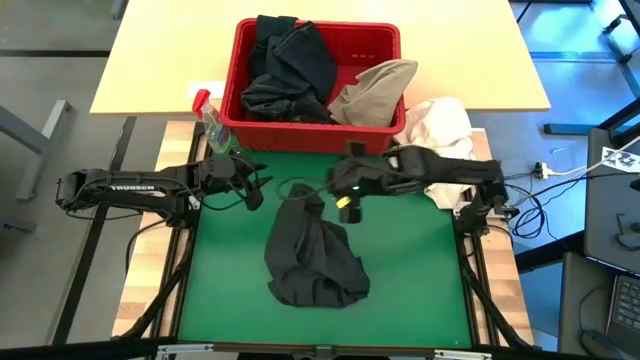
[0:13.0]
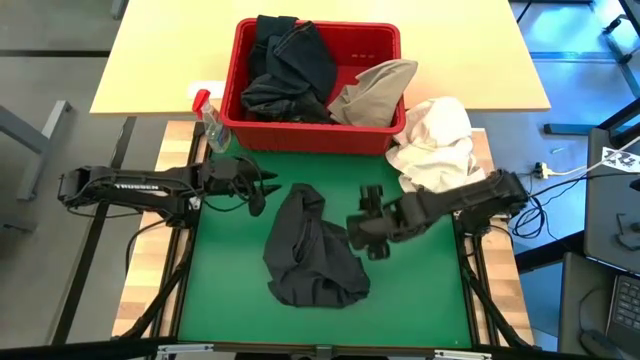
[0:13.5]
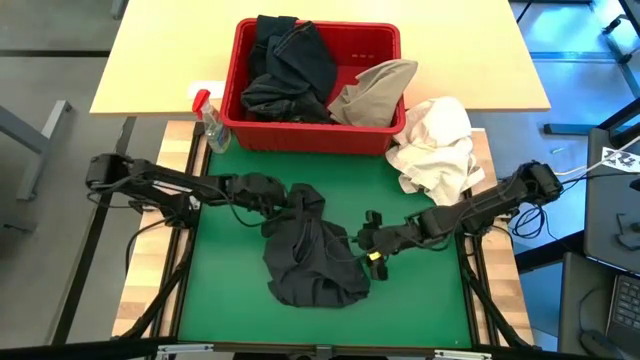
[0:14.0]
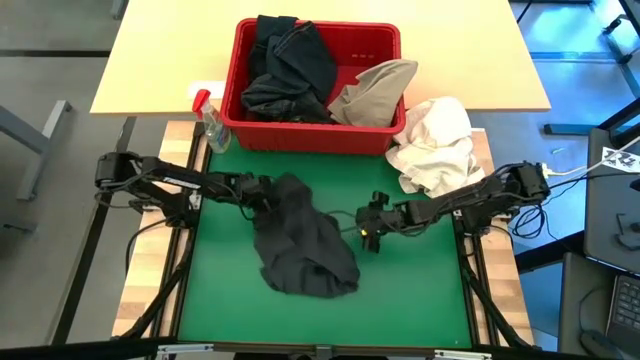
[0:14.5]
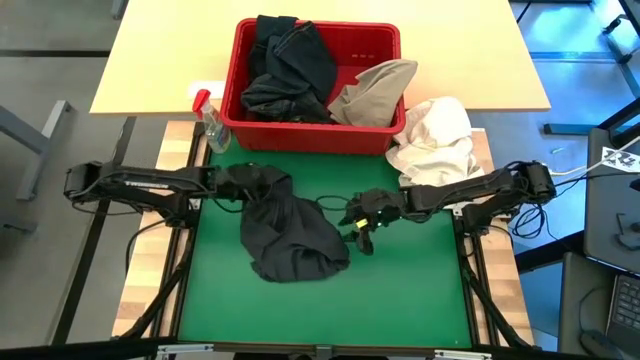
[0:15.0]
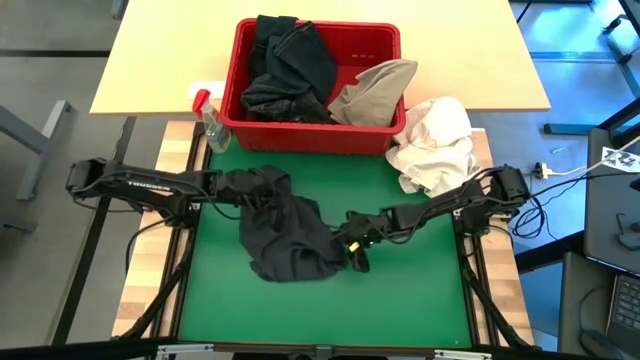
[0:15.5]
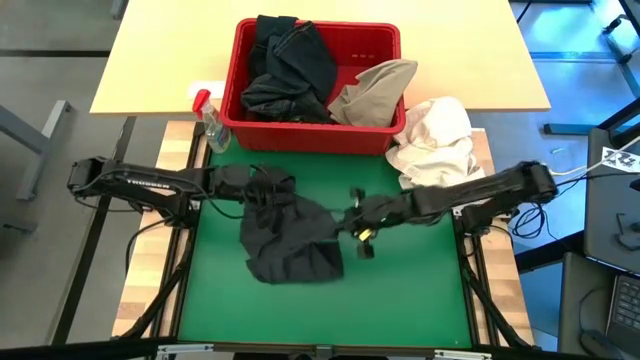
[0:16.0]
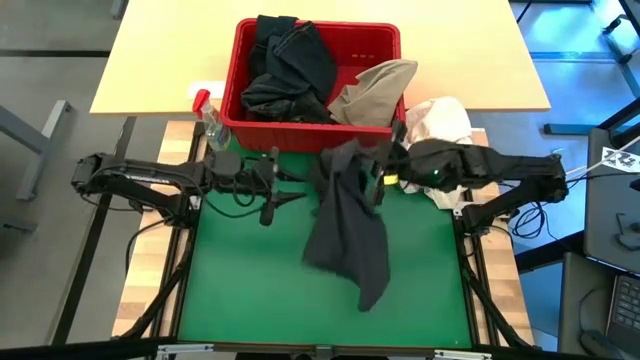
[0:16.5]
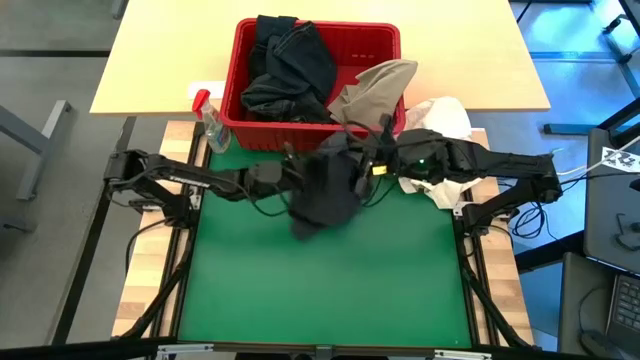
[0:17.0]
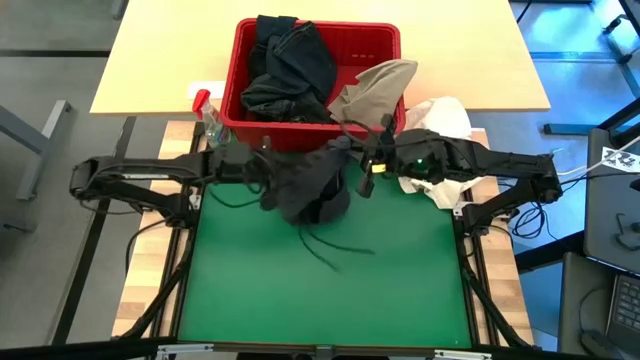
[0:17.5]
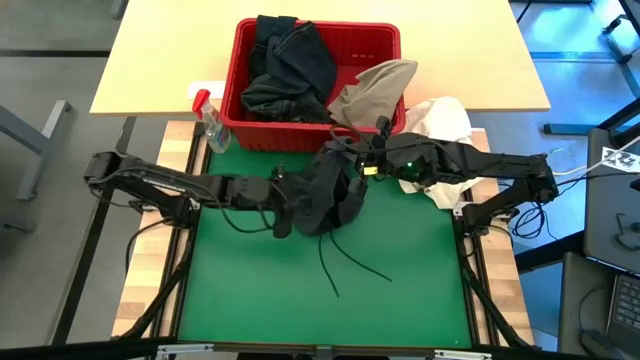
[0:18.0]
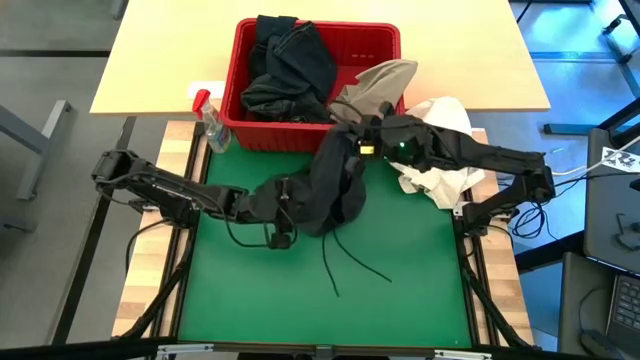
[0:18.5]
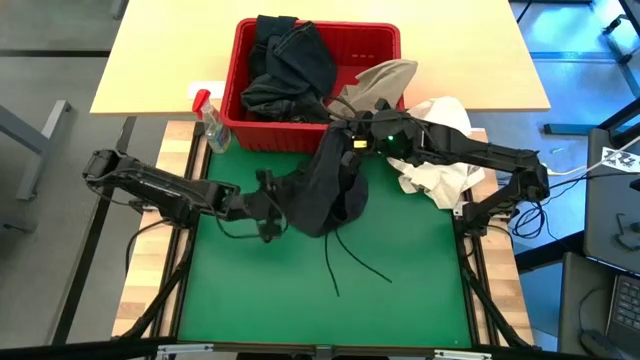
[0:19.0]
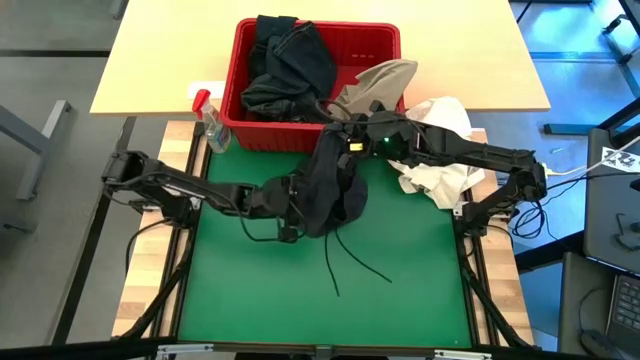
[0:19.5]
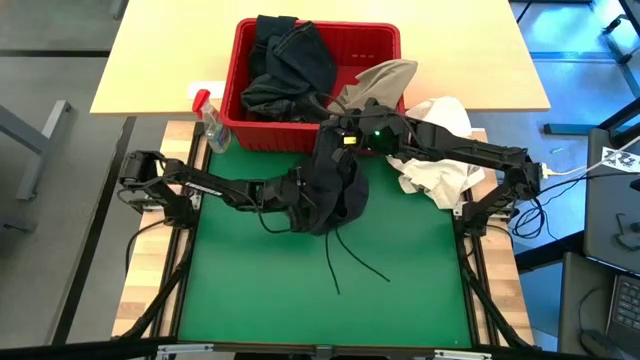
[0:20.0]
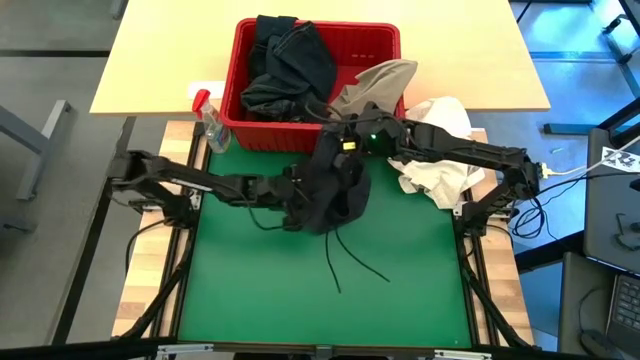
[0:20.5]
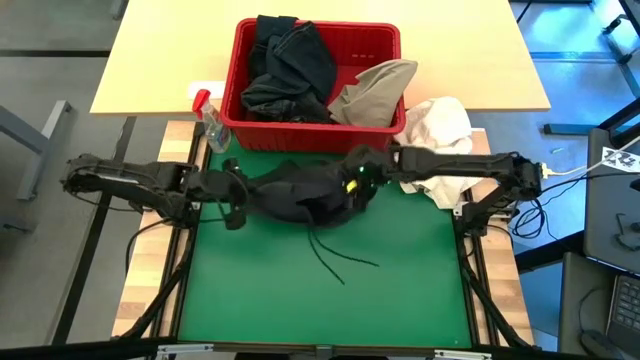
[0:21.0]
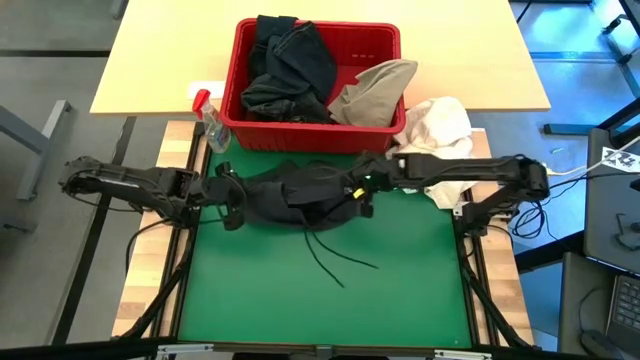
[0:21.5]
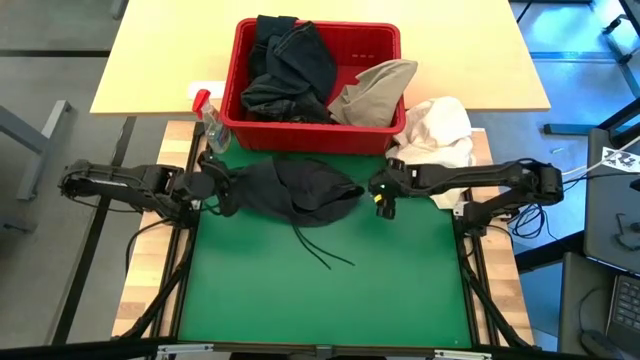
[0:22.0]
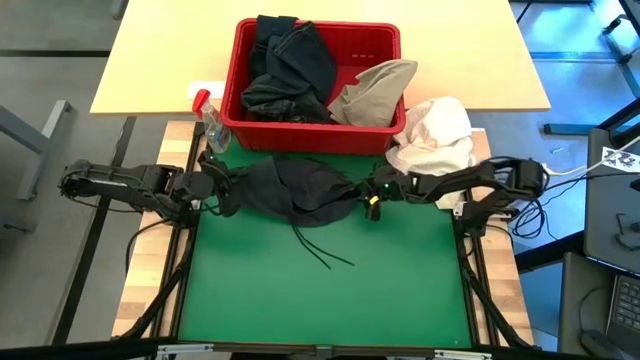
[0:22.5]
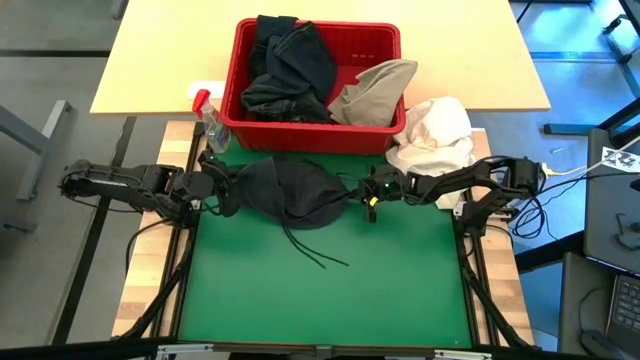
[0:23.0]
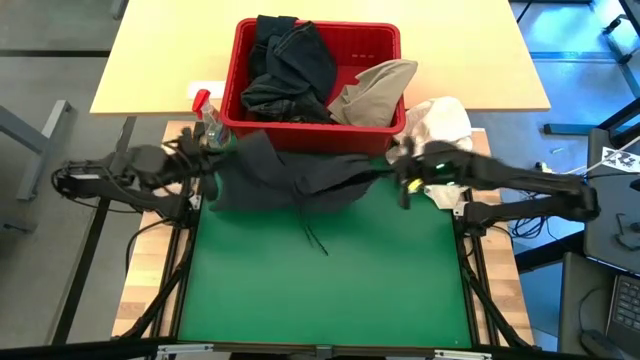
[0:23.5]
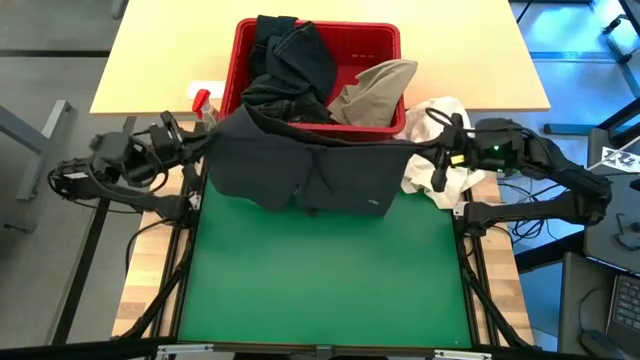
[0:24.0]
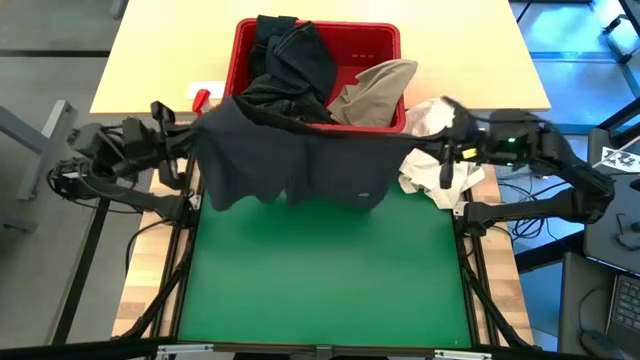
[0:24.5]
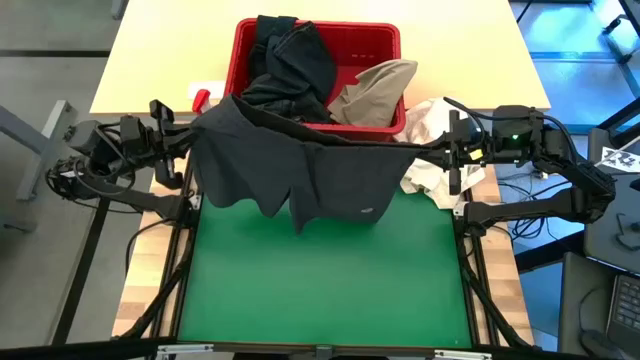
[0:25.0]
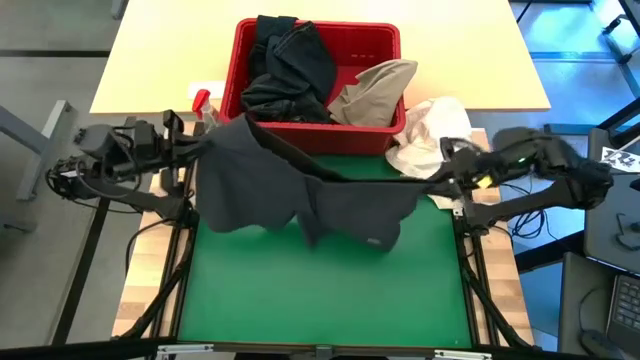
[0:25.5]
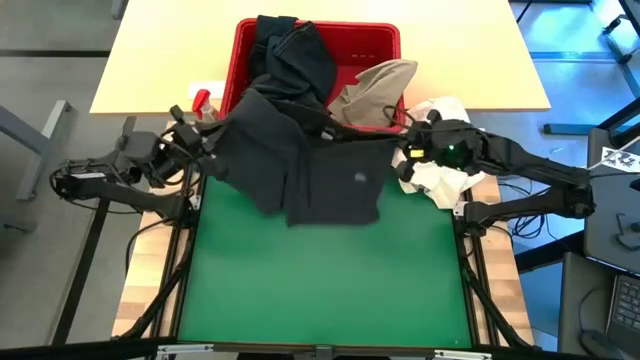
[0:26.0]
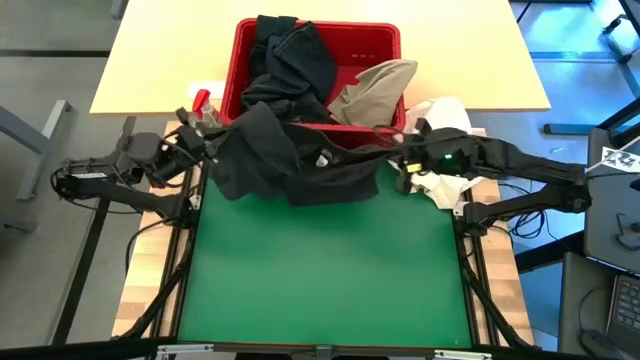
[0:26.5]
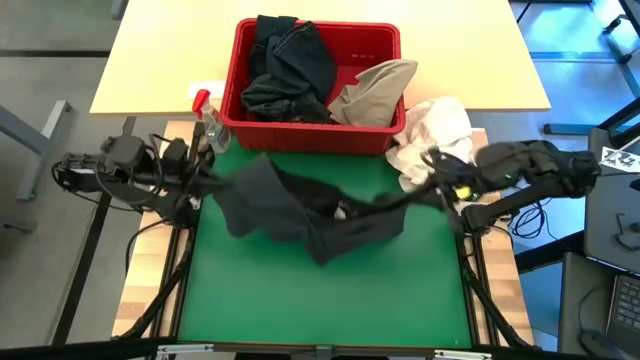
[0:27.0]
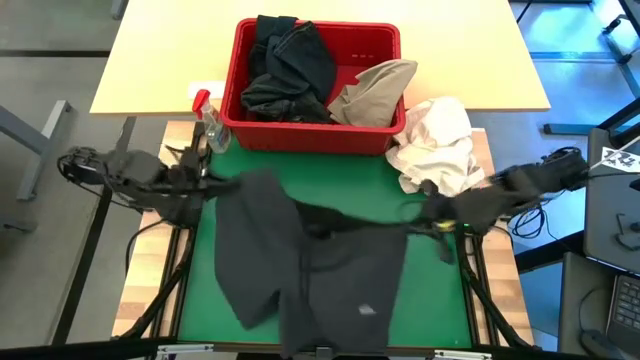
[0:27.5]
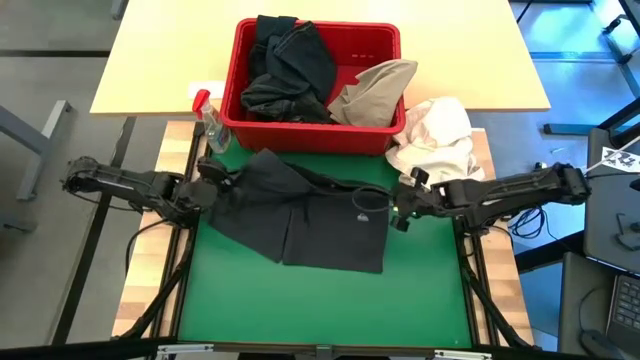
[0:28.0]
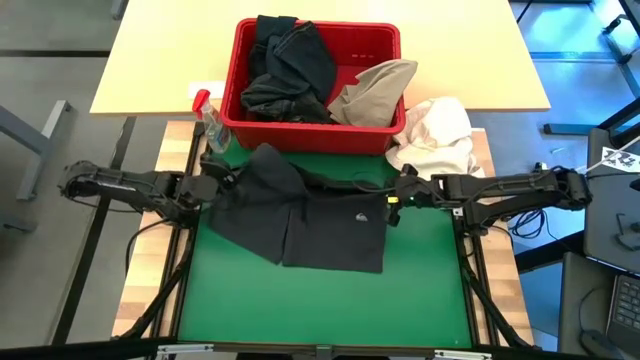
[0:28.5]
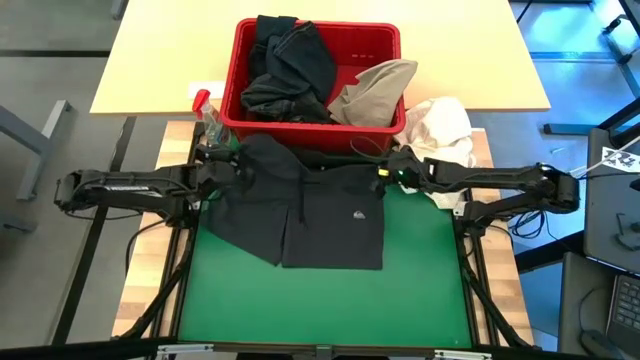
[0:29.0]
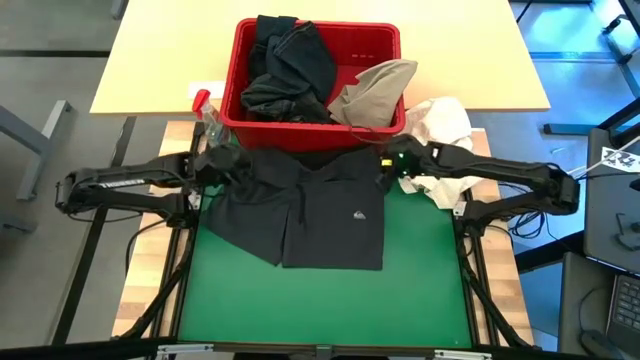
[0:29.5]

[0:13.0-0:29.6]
Task: Fold Laundry from Bin
Fold the black shorts
